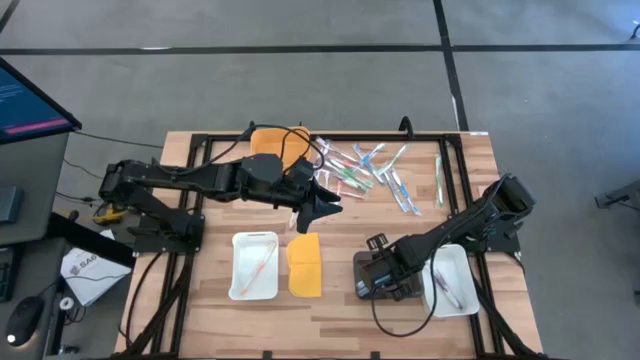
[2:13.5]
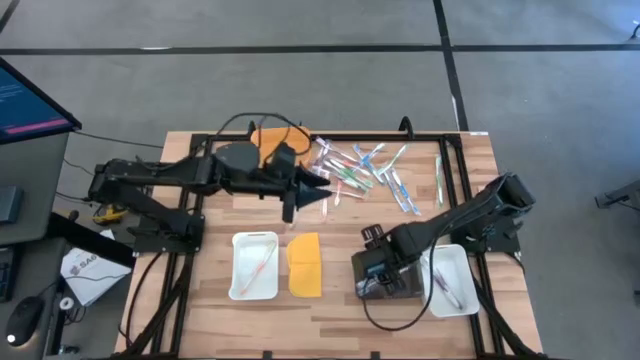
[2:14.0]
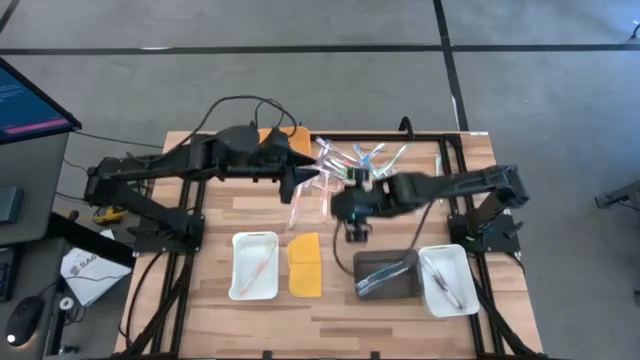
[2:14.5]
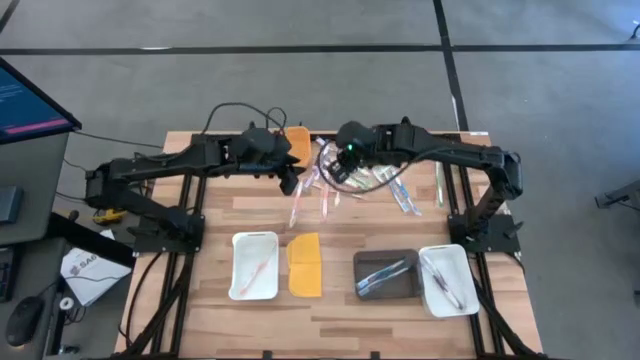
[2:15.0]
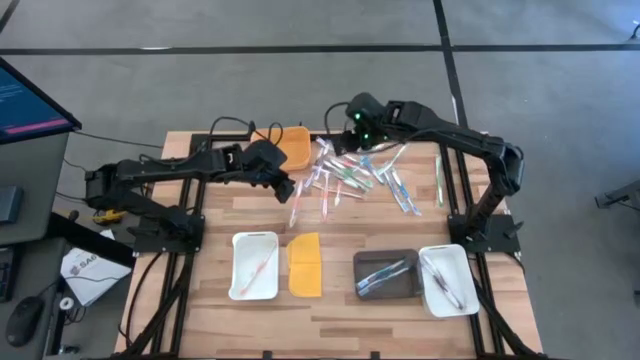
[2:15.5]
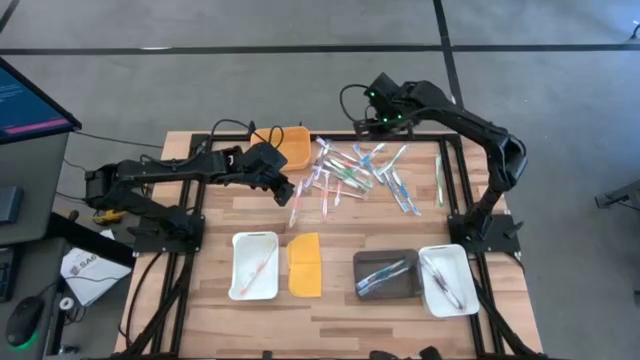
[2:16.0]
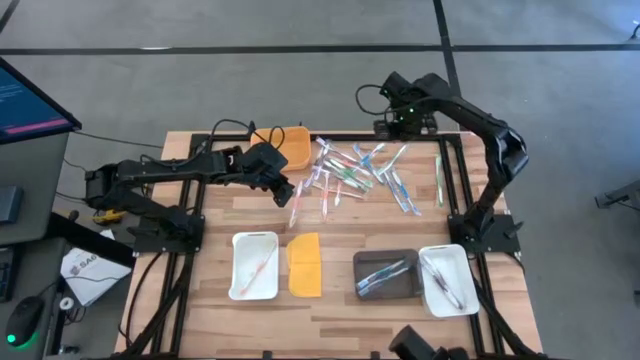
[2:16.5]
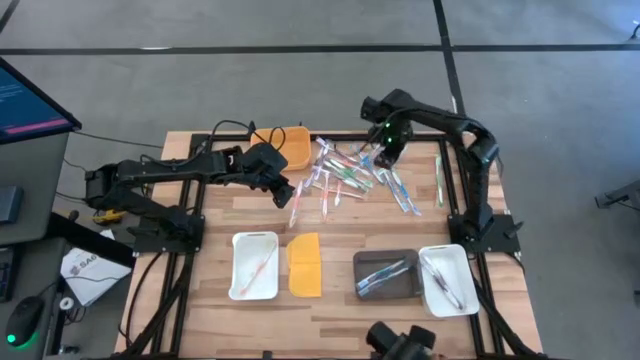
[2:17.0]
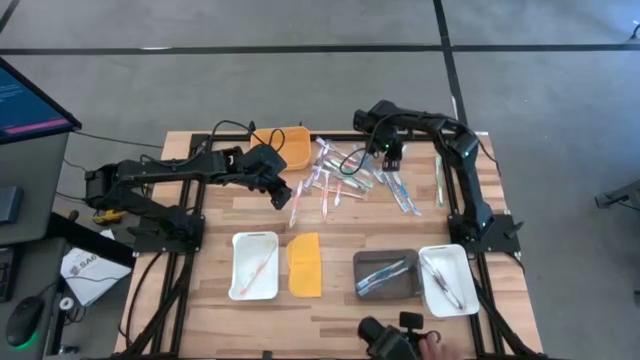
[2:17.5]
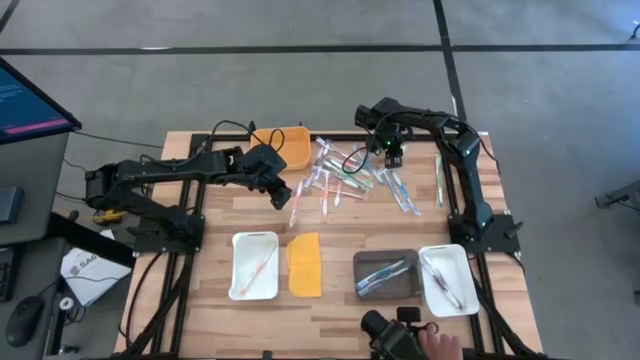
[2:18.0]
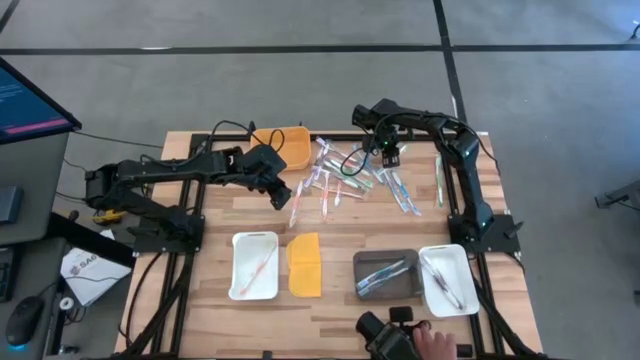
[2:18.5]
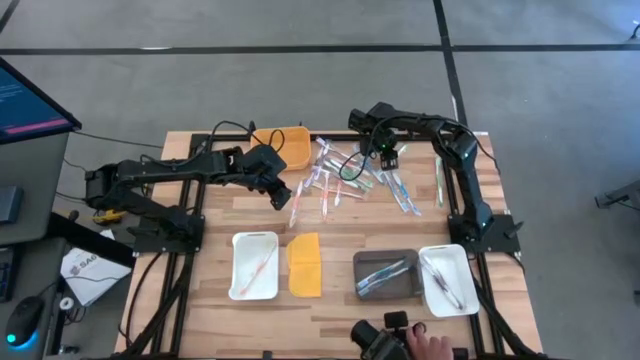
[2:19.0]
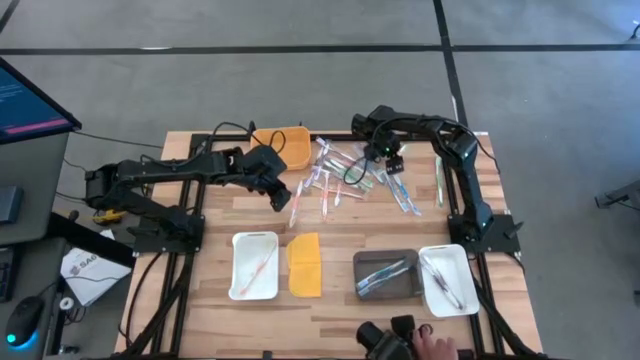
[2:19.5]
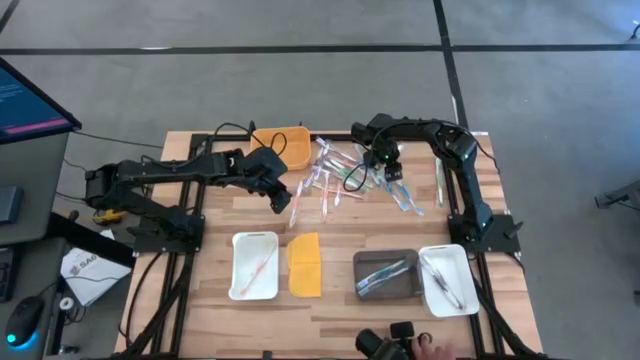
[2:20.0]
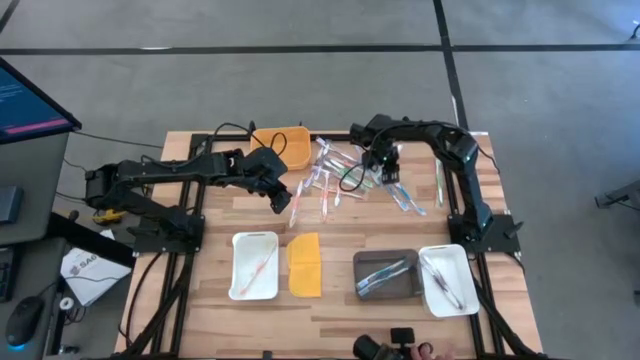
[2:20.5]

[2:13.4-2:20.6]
Task: Pick & Place Toothbrushes
Put the green toothbrush into the yellow bin

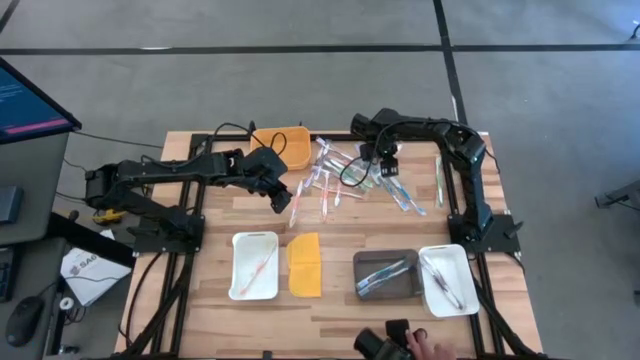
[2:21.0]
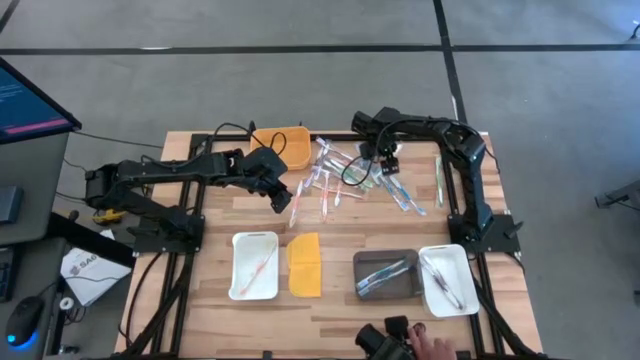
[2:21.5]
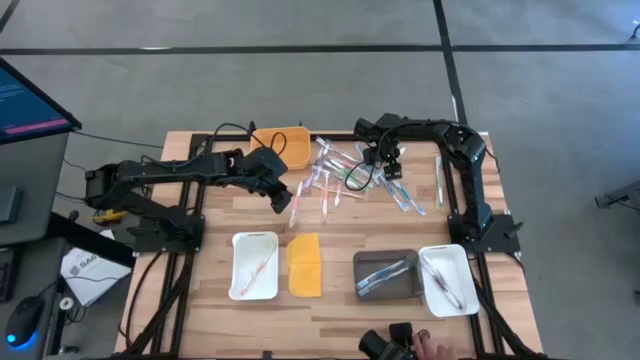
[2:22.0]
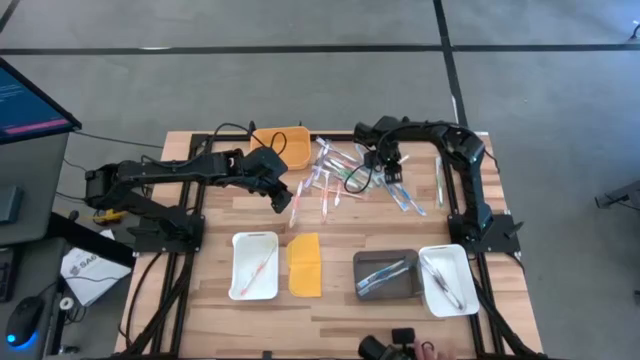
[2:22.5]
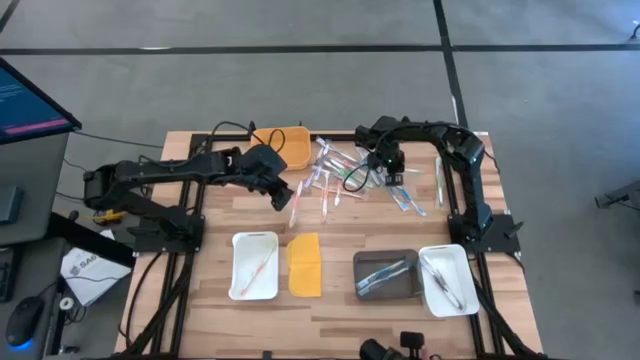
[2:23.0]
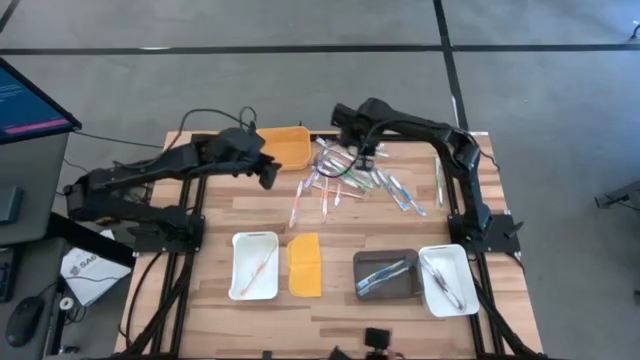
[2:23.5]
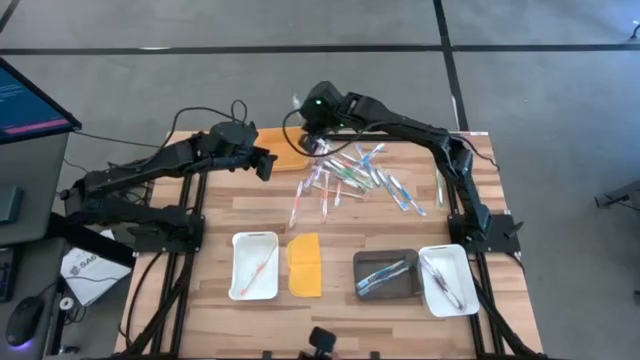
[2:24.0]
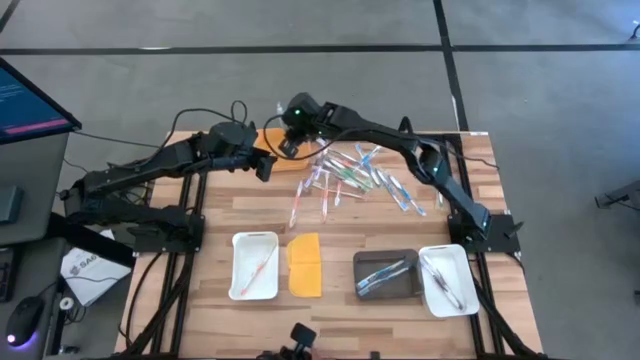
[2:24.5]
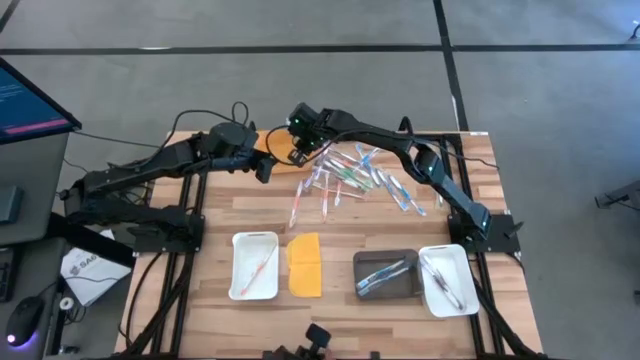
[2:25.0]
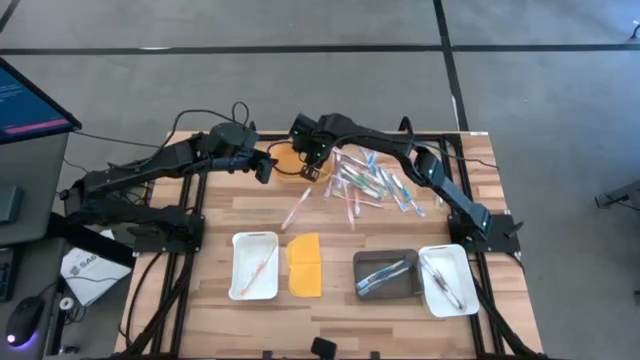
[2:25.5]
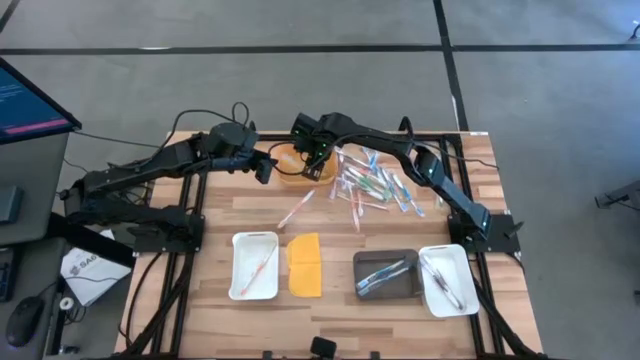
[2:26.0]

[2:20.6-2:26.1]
Put the green toothbrush into the yellow bin

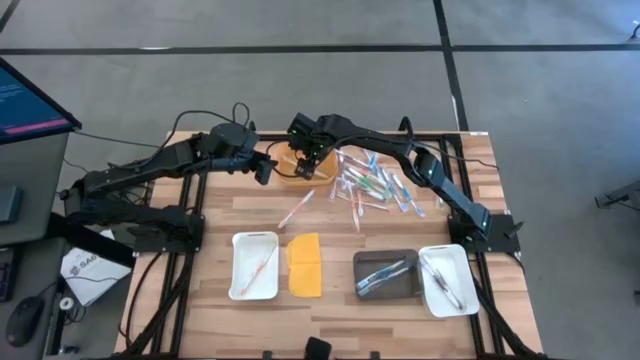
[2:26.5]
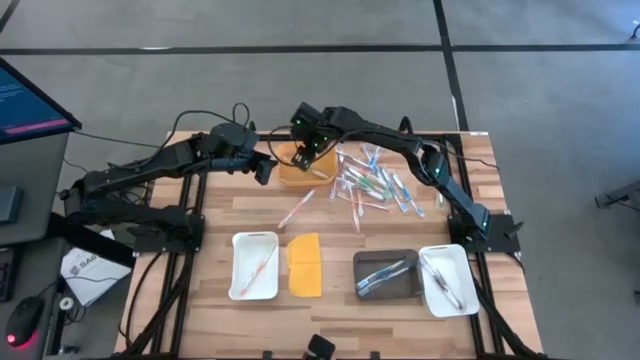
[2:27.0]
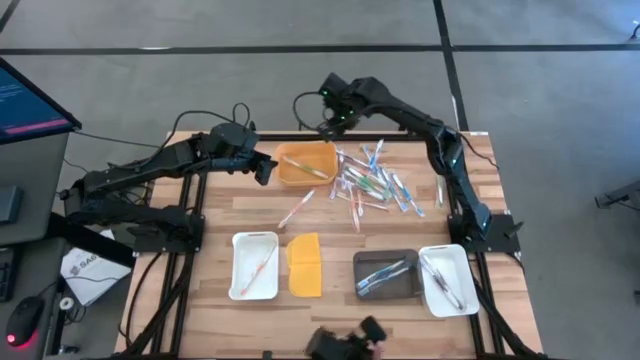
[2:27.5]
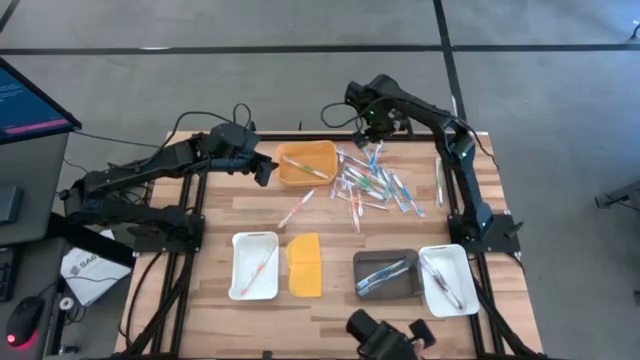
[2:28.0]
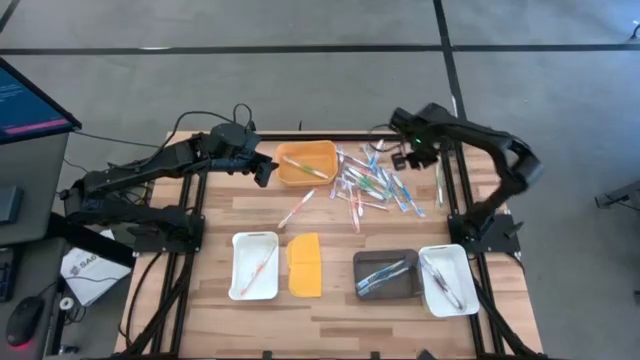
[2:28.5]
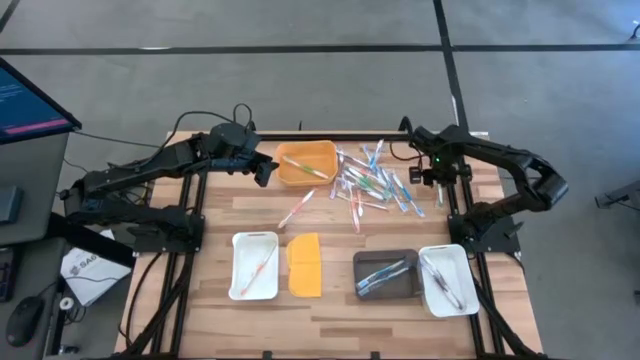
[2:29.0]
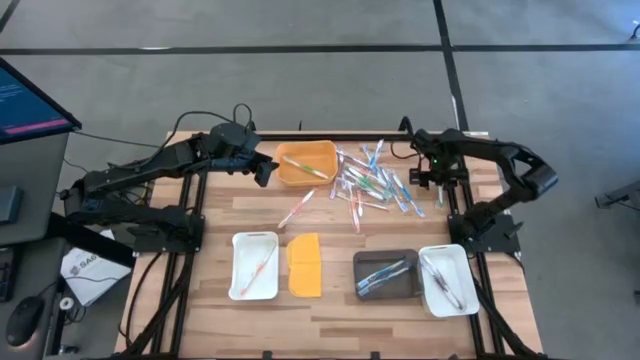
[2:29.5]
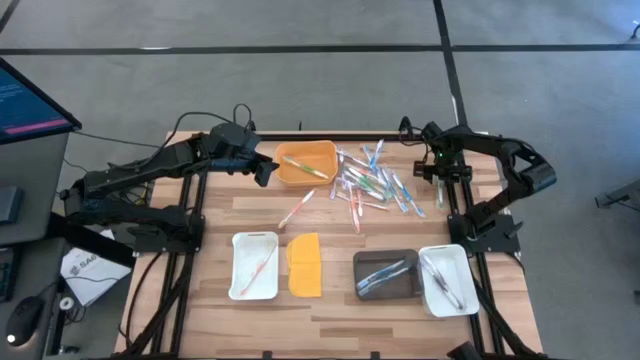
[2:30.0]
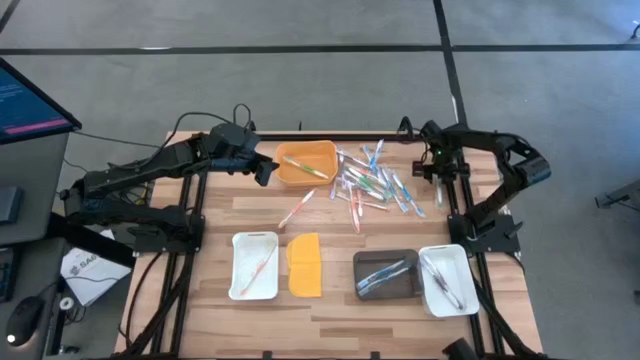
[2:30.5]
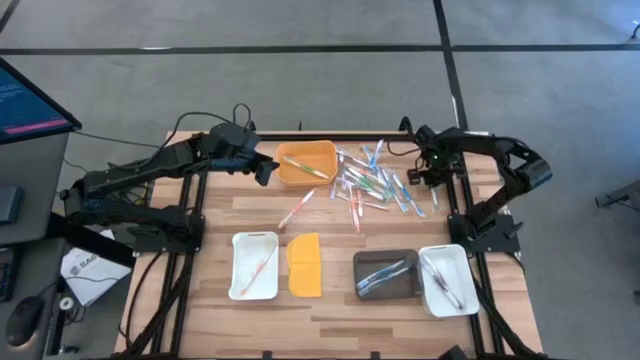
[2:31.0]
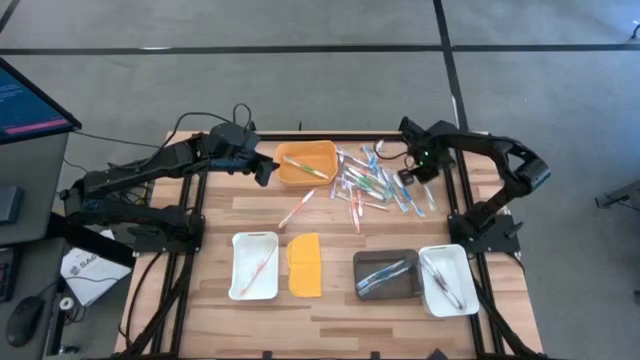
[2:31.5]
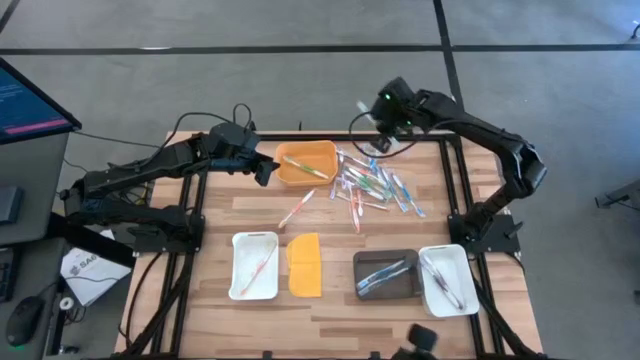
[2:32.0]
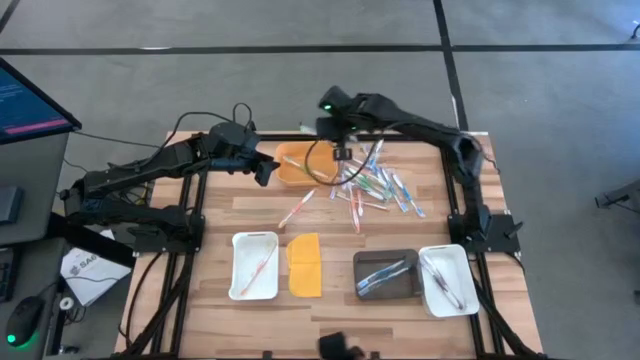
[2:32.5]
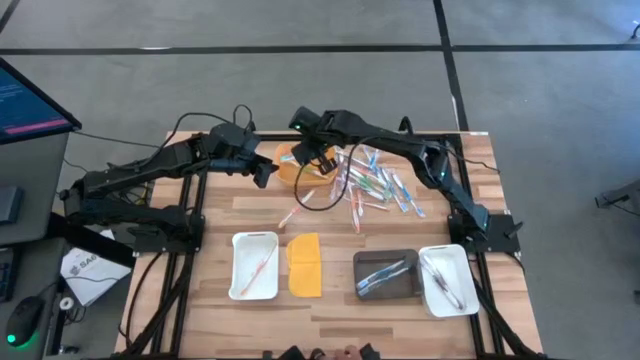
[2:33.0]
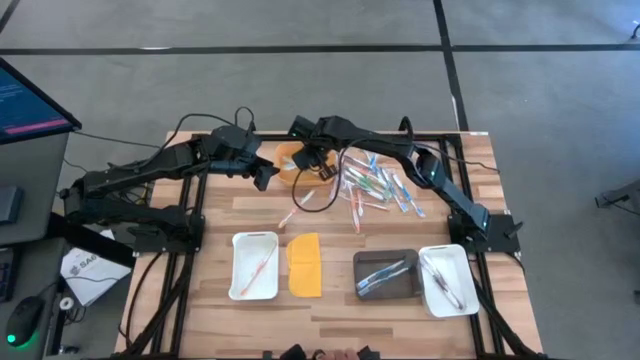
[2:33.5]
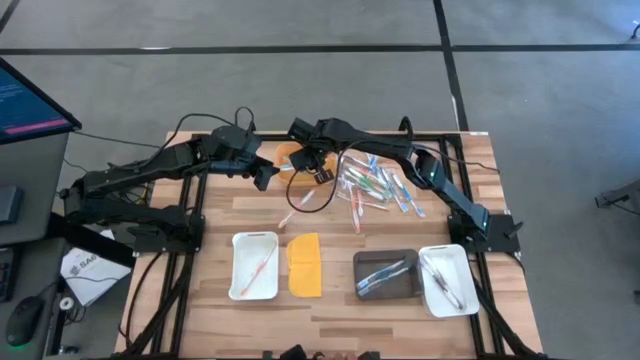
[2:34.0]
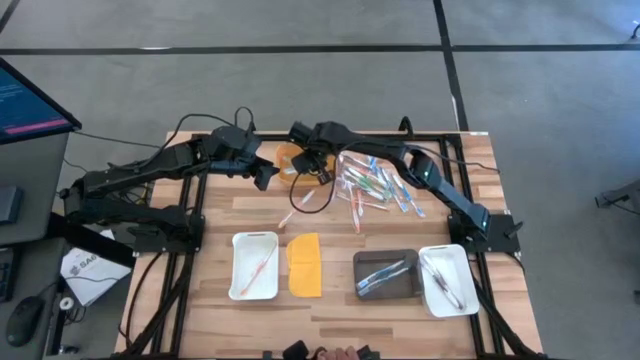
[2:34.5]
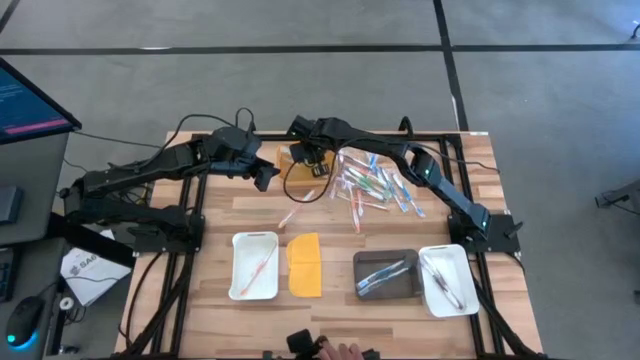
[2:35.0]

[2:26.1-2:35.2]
Put the green toothbrush into the yellow bin
